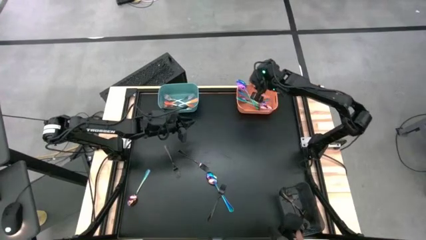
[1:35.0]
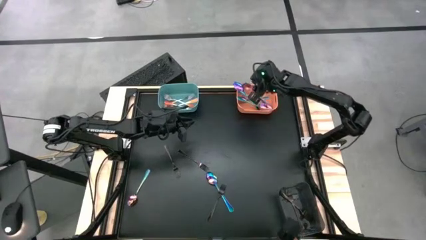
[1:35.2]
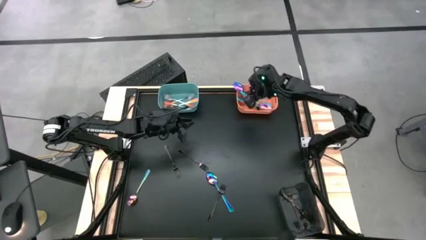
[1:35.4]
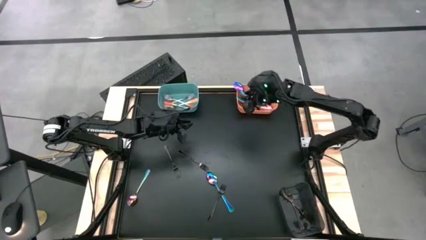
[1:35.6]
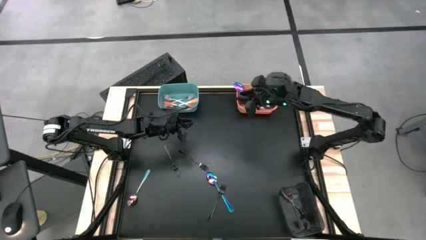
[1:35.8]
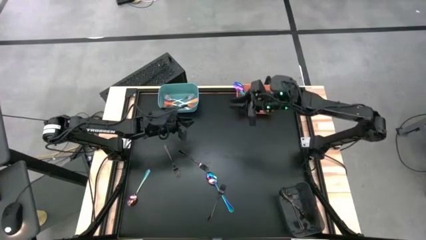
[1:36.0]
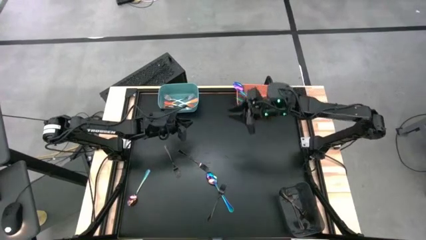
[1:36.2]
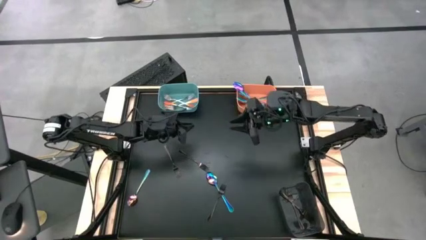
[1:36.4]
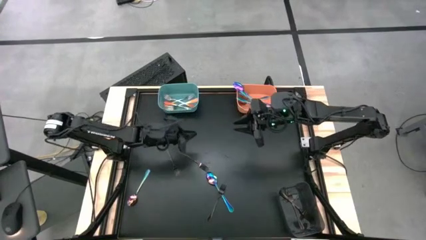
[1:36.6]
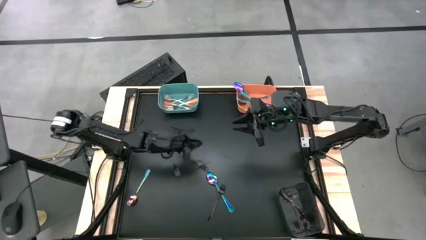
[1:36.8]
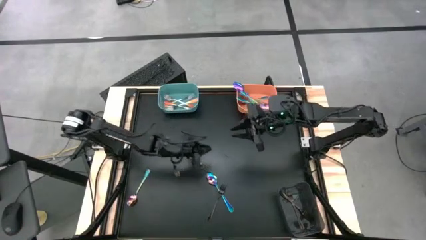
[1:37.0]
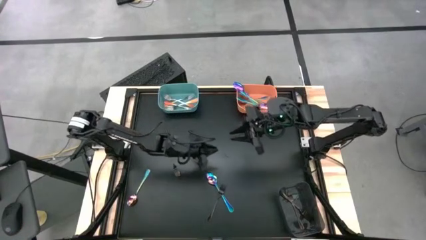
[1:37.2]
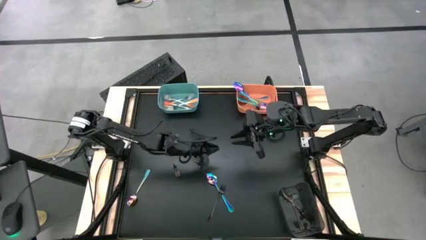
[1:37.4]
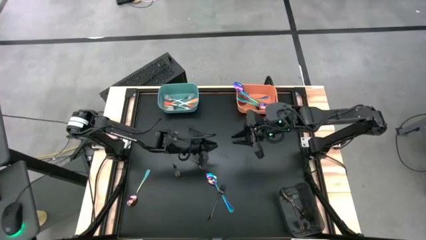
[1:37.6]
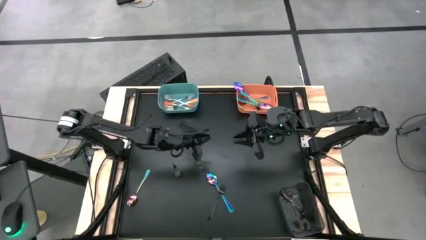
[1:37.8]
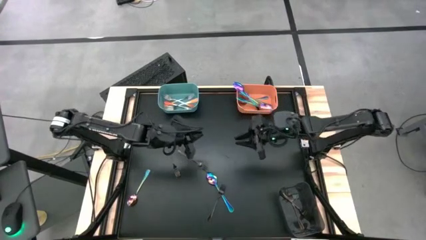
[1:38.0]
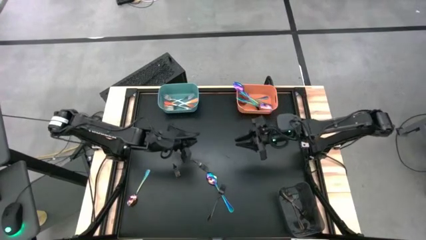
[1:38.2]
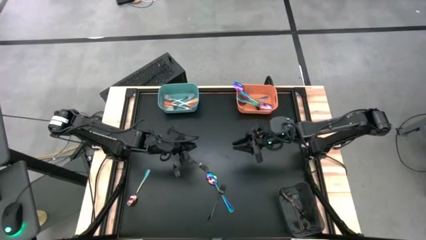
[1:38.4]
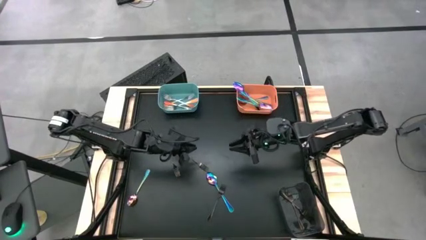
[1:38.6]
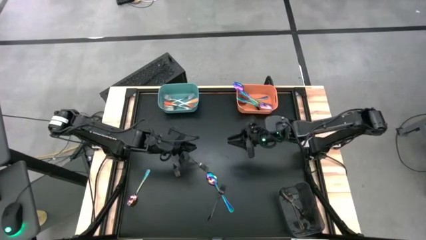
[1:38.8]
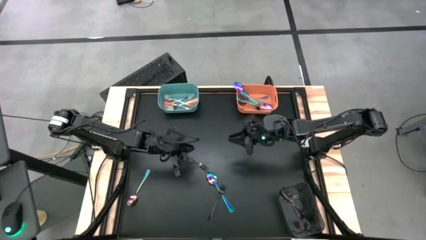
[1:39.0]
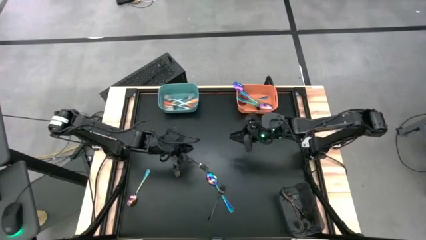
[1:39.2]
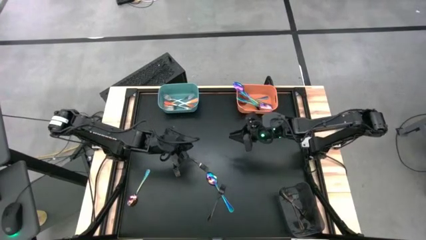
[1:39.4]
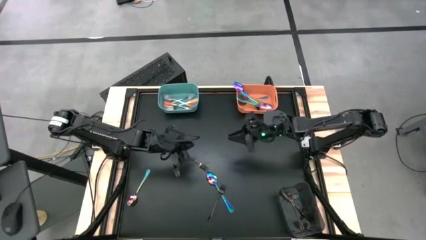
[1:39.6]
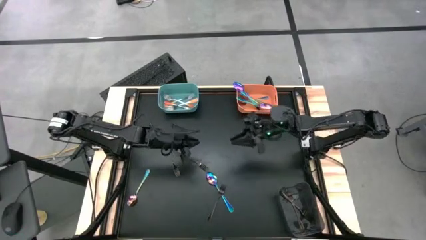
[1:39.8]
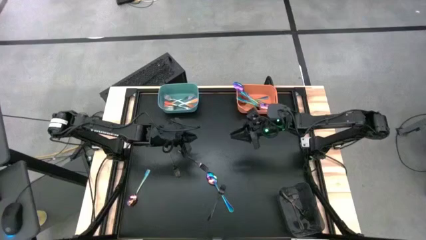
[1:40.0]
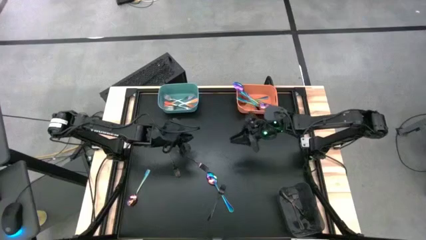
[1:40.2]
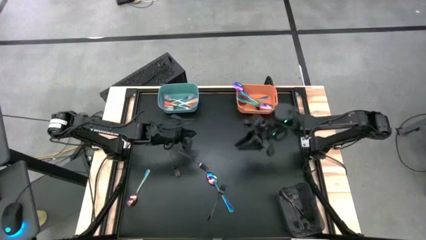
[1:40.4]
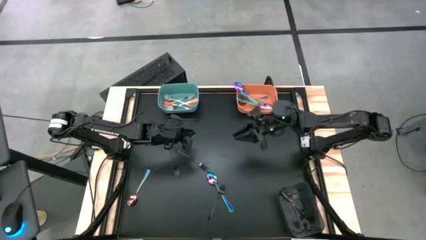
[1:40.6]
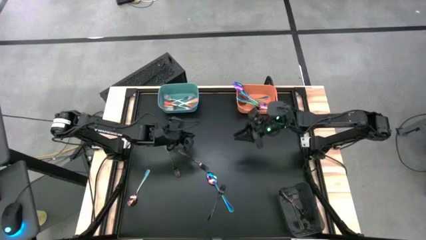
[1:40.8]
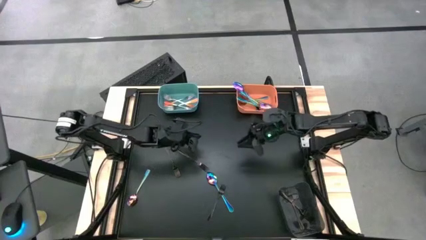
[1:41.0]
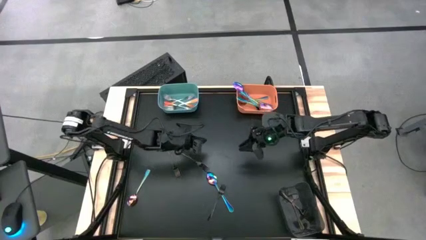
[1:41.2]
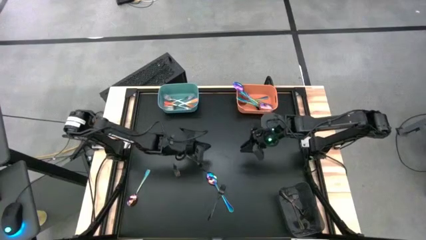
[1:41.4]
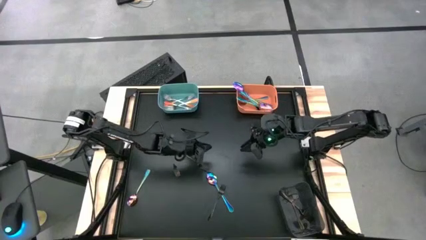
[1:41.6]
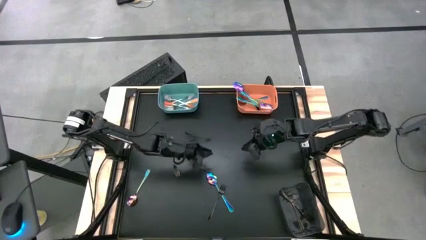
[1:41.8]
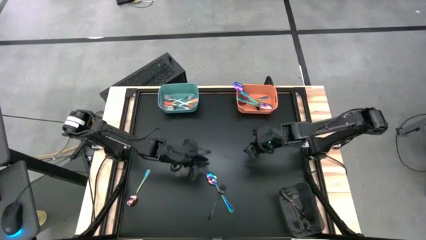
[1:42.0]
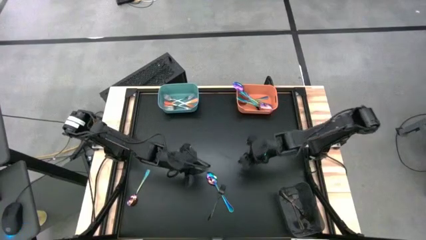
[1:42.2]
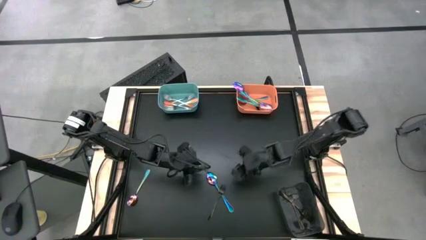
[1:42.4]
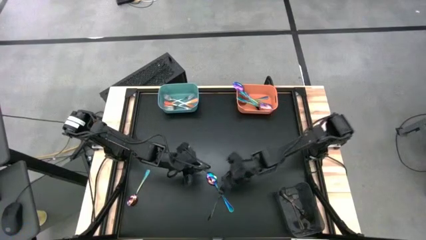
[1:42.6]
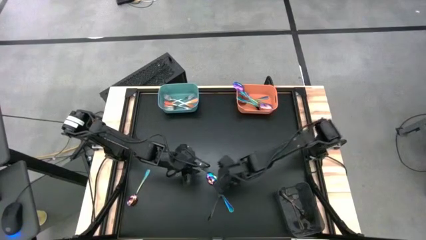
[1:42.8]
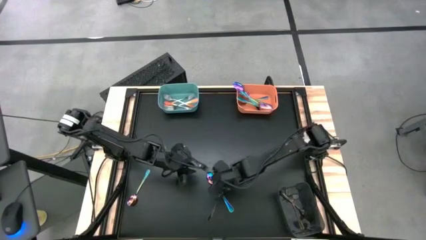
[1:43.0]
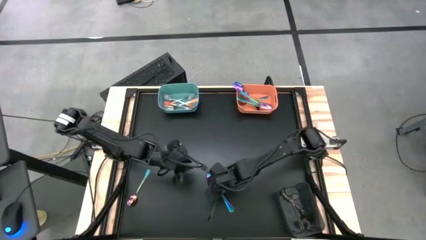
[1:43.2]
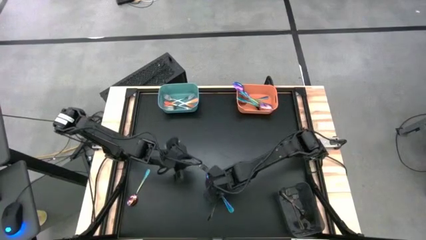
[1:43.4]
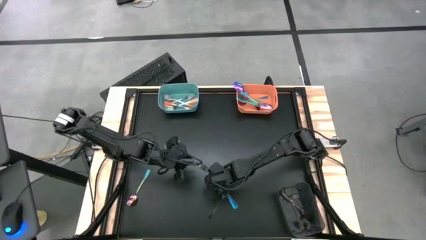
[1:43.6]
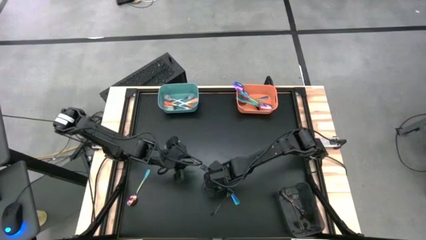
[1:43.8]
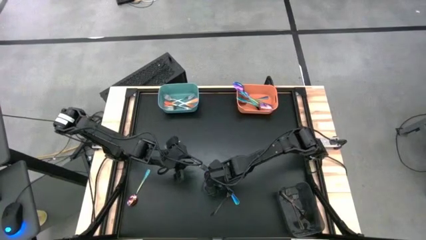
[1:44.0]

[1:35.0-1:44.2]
Task: Sort silverware by color (type)
Put the purple spoon into the orange bin

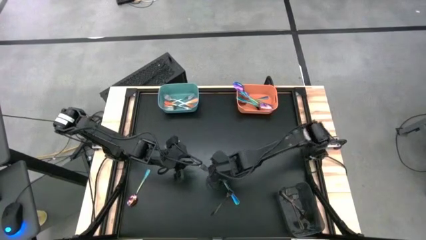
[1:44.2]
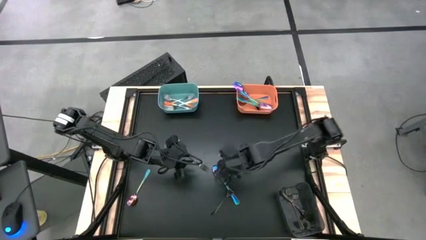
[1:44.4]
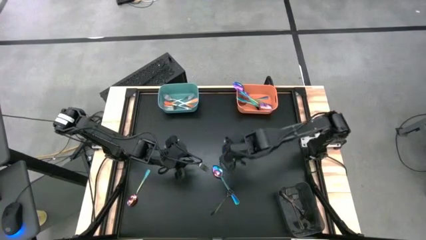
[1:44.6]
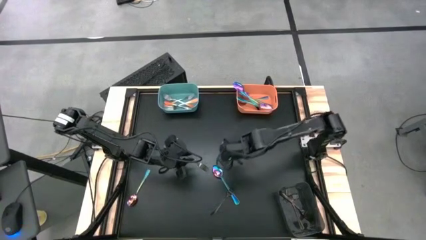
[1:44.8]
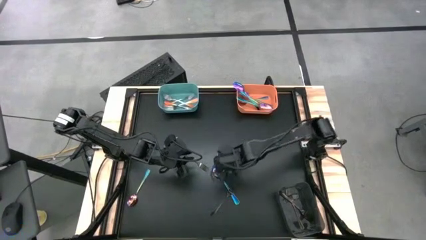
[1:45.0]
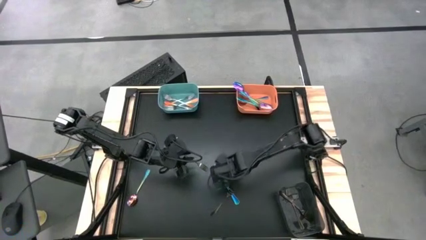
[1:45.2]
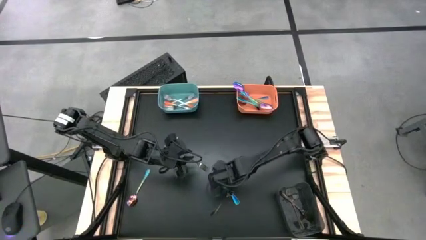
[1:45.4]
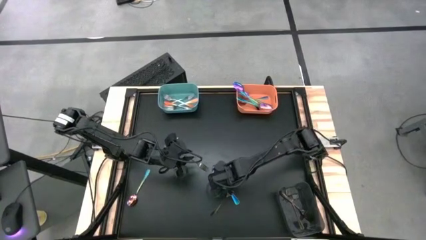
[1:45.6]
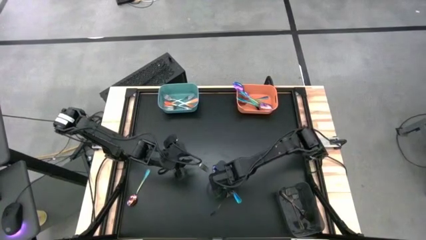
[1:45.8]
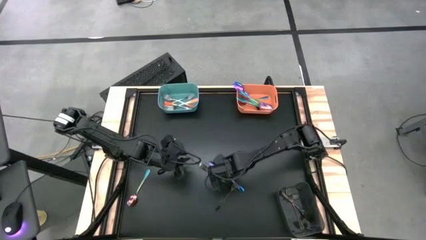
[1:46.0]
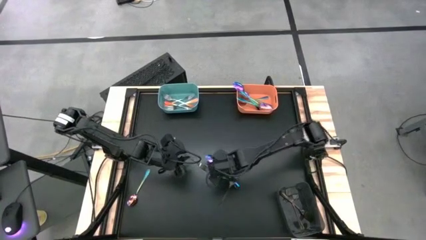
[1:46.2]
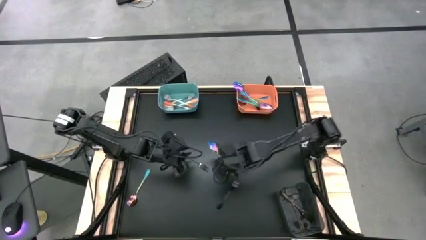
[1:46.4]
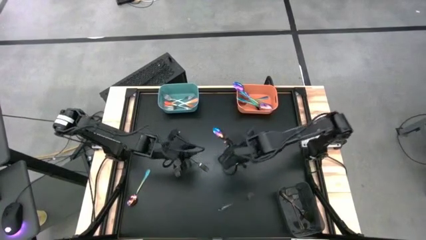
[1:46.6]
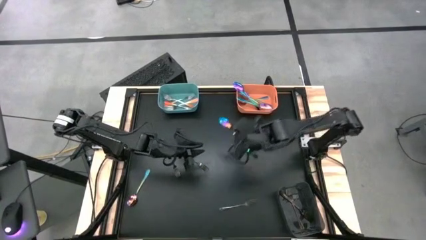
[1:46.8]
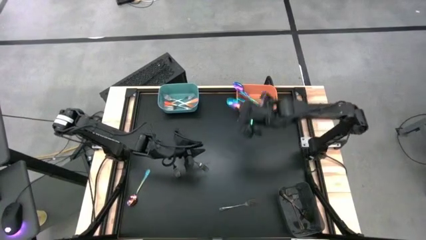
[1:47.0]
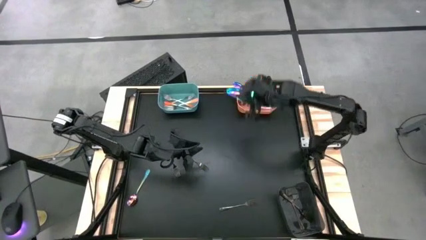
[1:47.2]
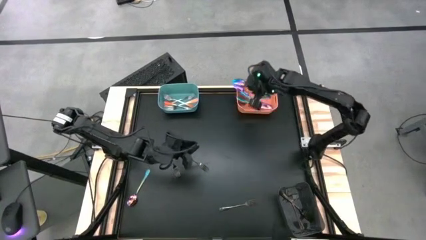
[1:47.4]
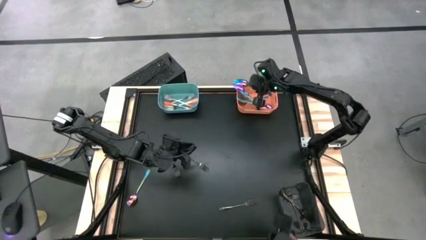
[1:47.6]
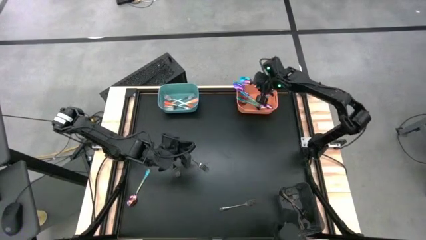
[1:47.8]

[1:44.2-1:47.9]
Put the spoon into the orange bin

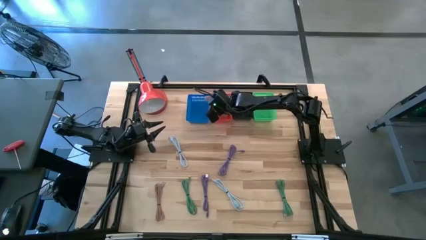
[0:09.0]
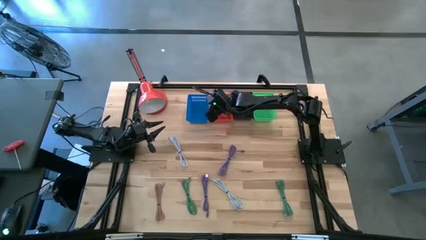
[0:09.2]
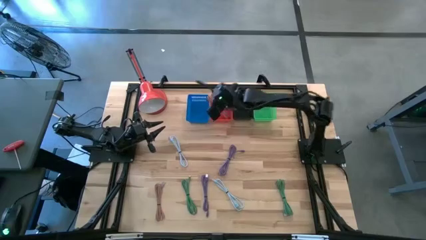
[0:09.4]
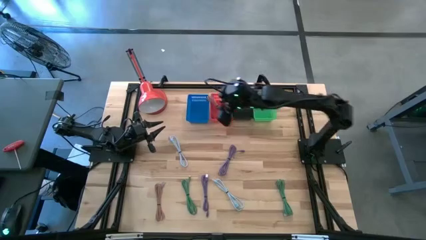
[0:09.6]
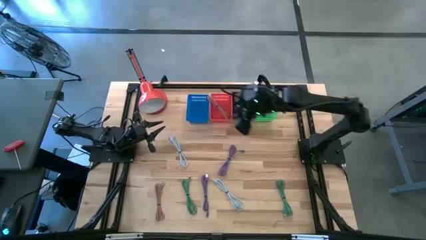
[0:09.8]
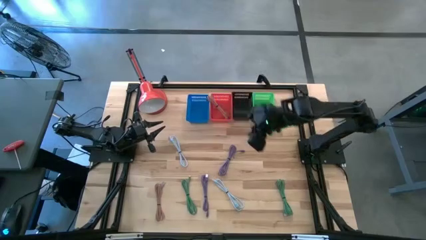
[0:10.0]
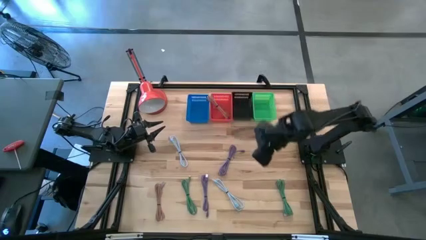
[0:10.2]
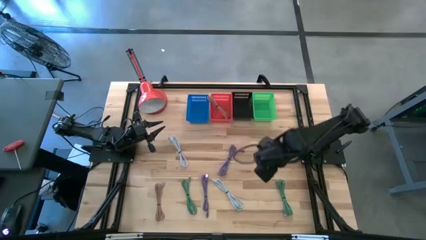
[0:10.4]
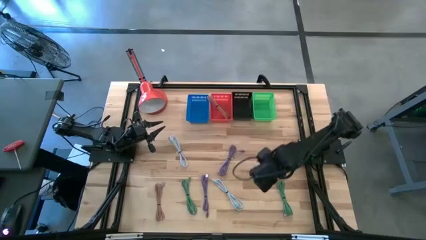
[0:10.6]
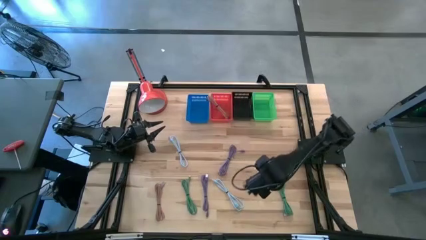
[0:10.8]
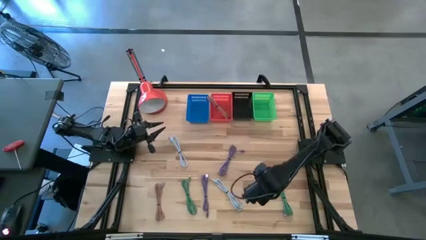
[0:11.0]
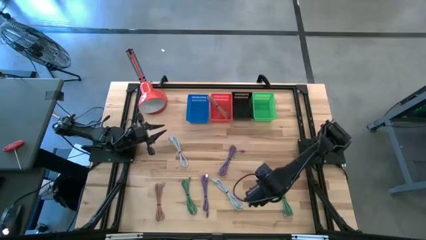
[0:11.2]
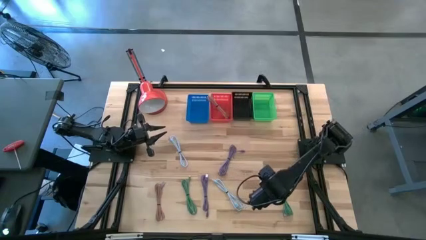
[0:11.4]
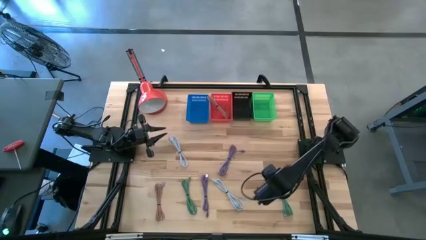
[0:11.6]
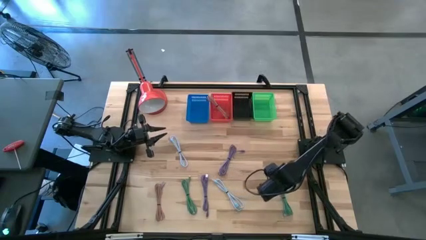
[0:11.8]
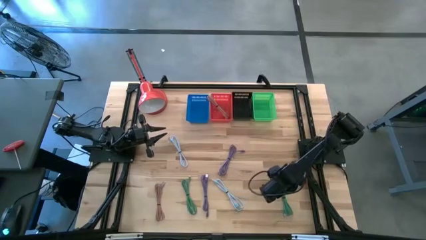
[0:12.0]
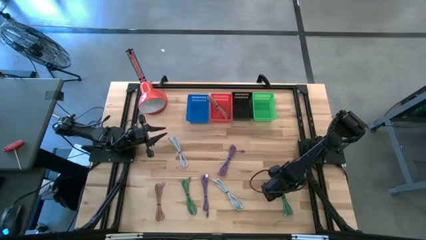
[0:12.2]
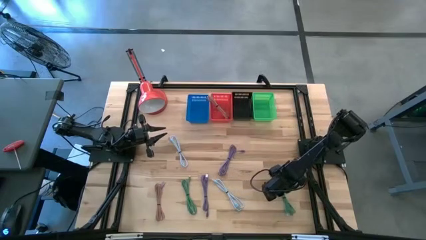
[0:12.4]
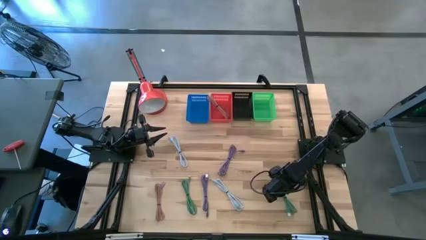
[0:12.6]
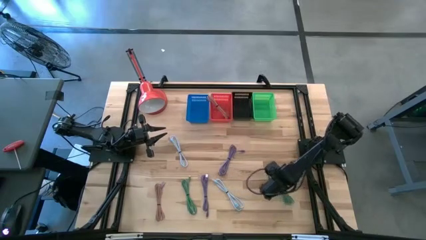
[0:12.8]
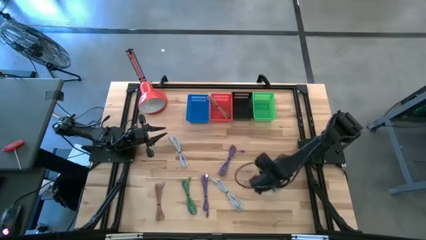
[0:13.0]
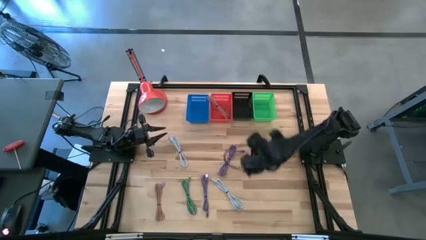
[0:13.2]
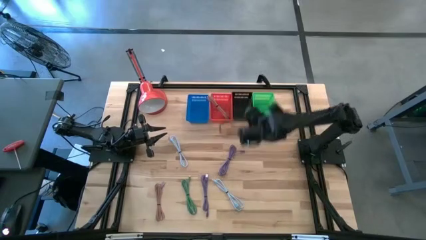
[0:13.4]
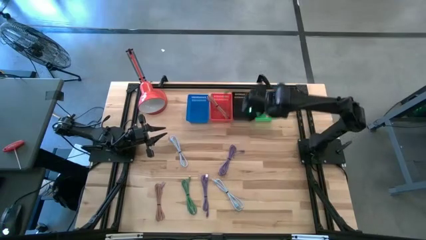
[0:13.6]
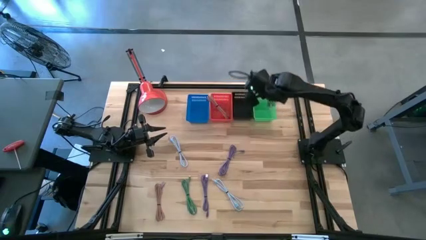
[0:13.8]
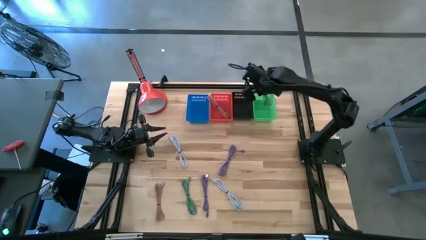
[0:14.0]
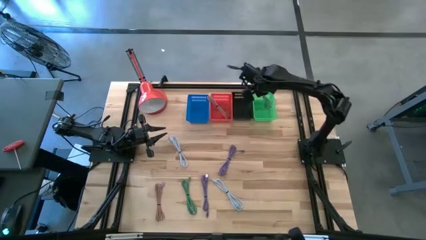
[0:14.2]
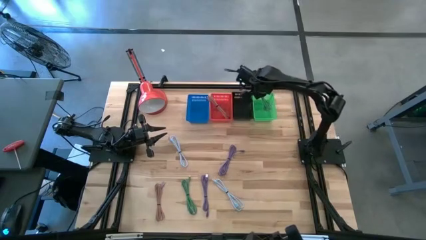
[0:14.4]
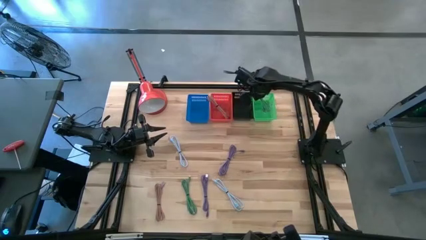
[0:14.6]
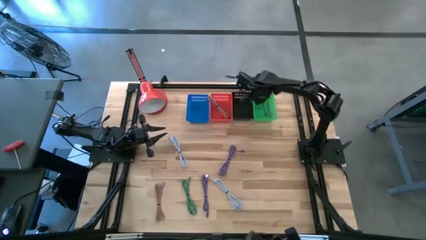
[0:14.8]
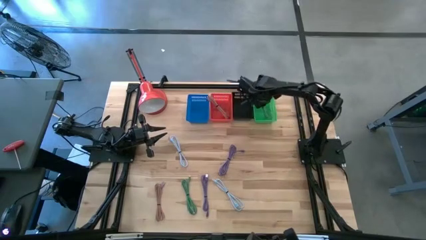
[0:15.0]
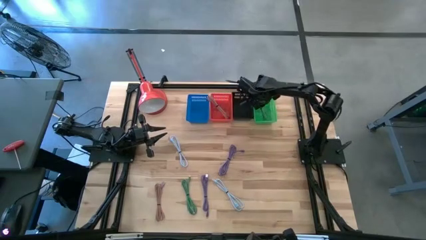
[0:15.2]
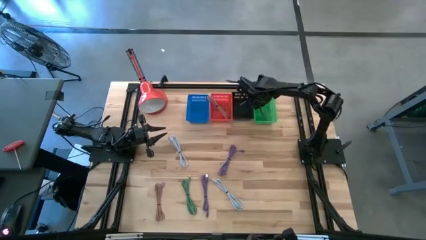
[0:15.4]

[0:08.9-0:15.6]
Task: Pick & Place USB Port
Put the right green charger cable into the green bin
